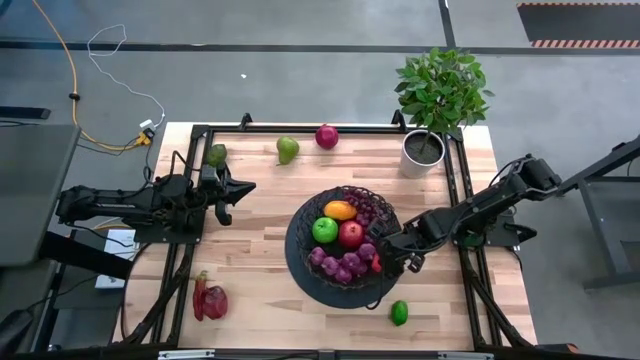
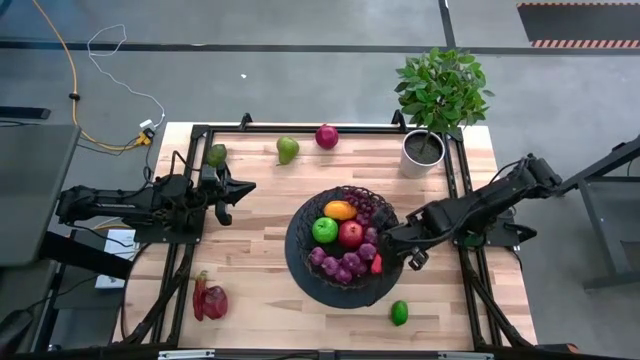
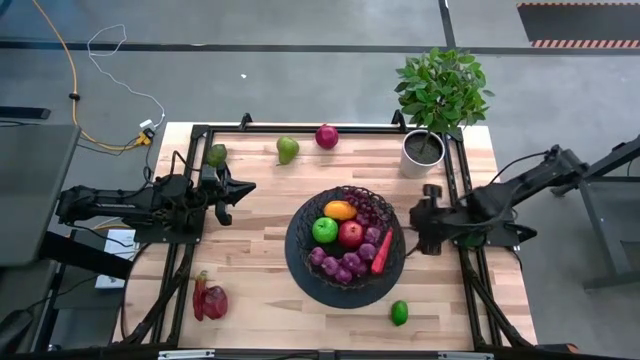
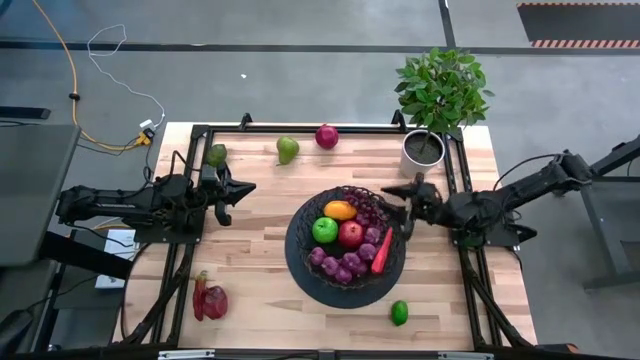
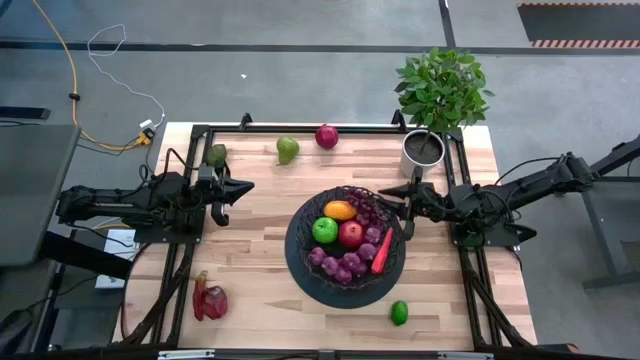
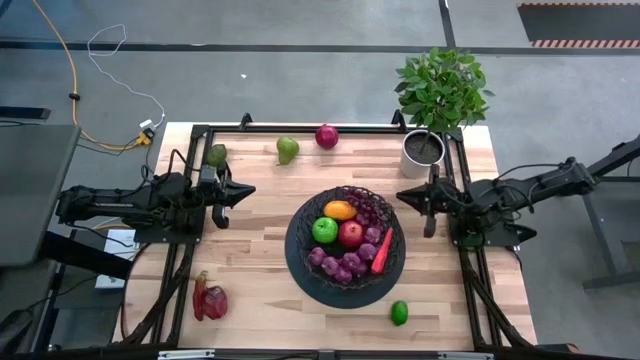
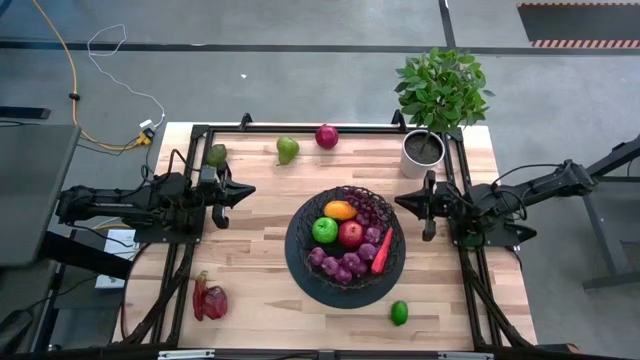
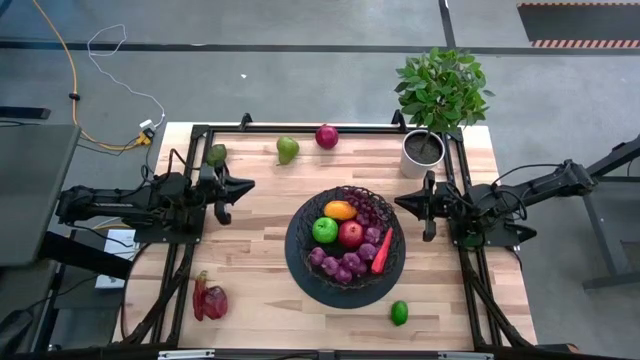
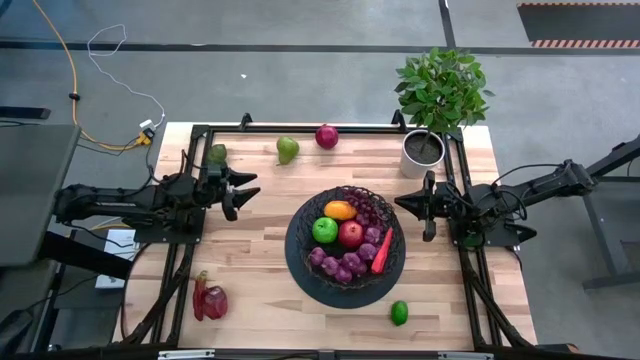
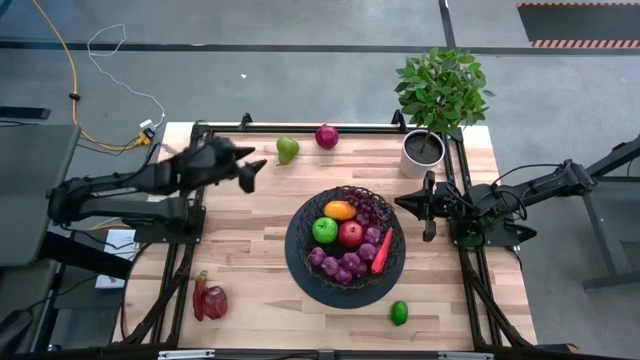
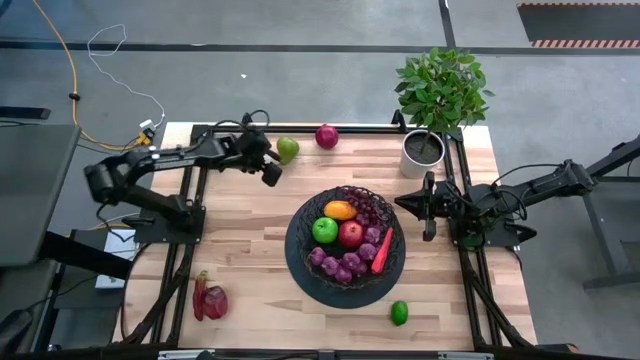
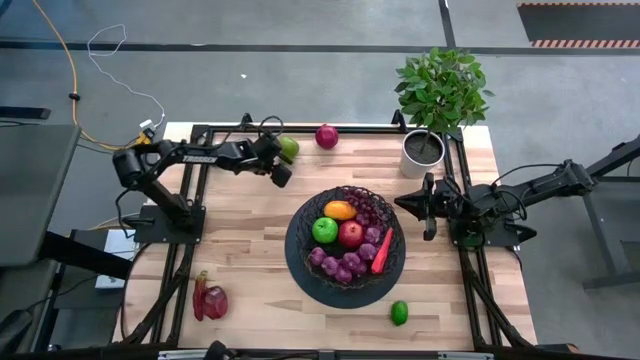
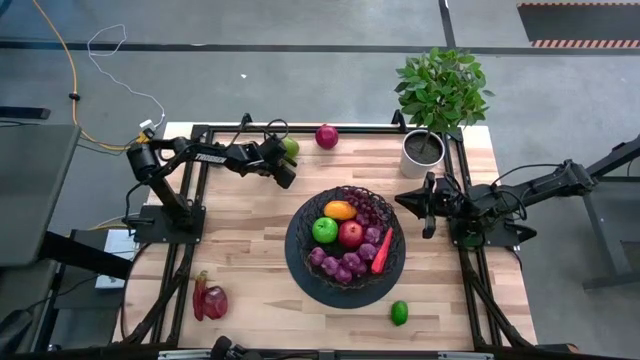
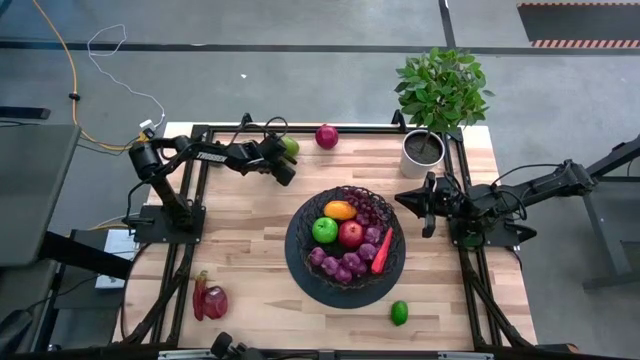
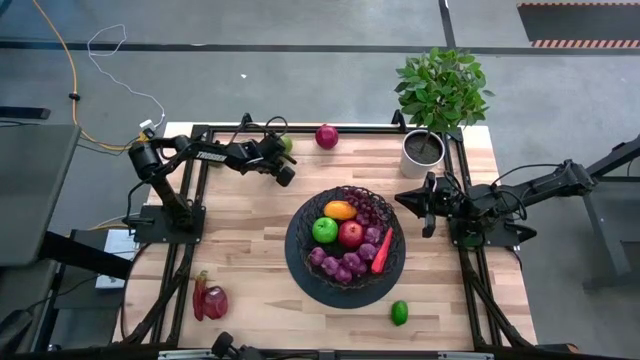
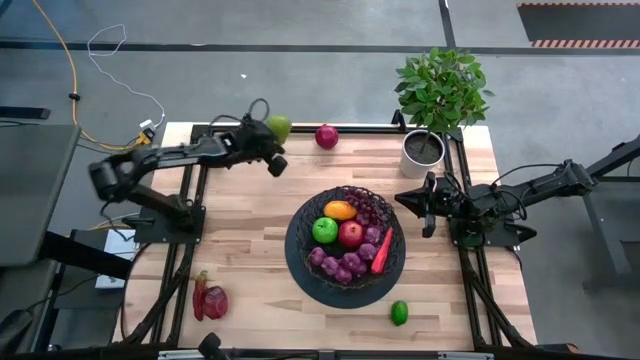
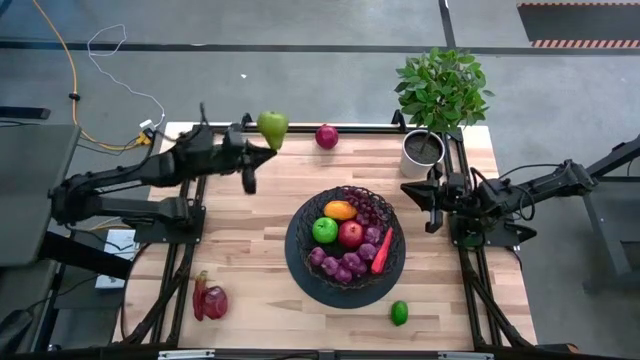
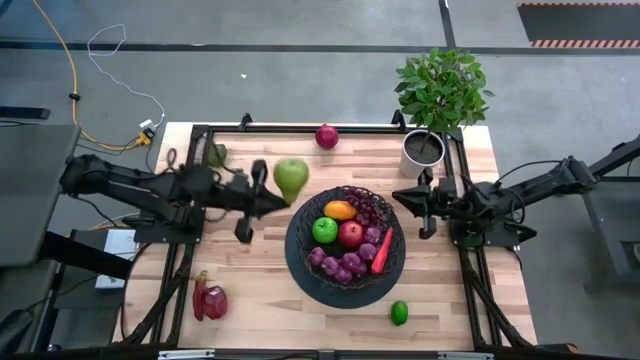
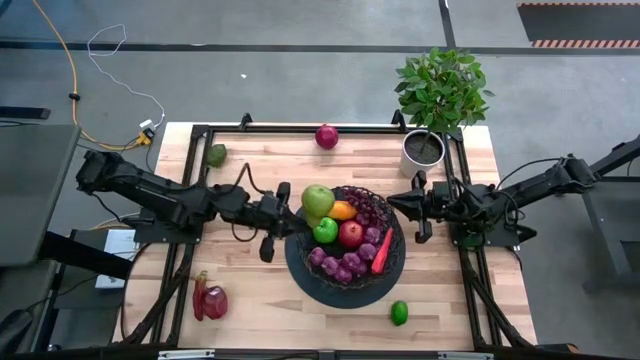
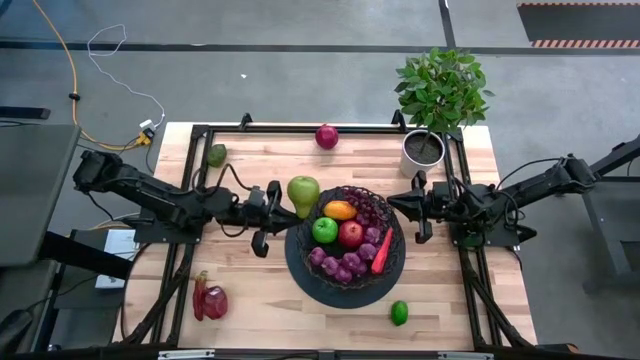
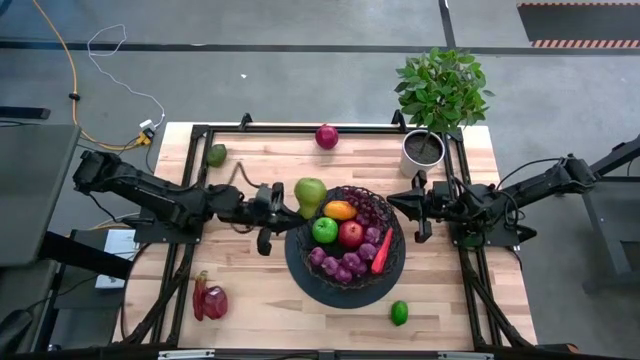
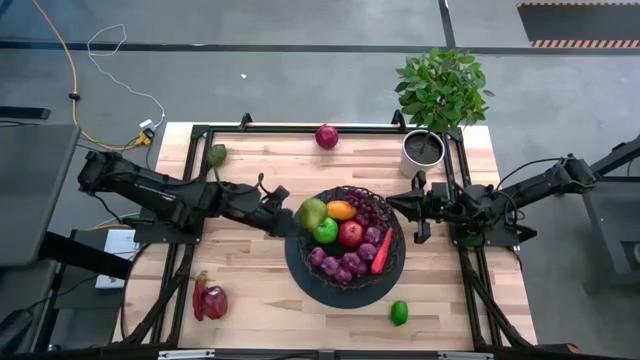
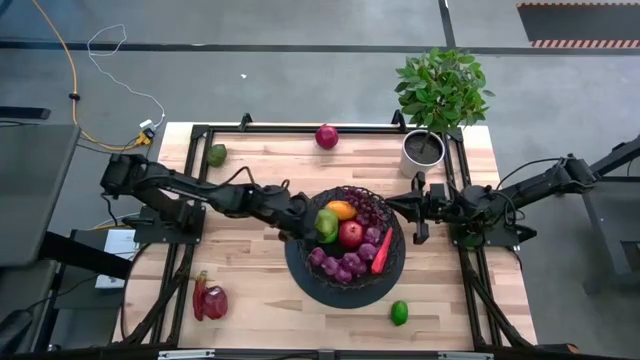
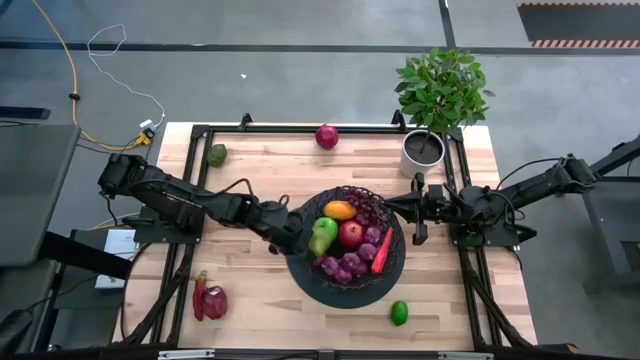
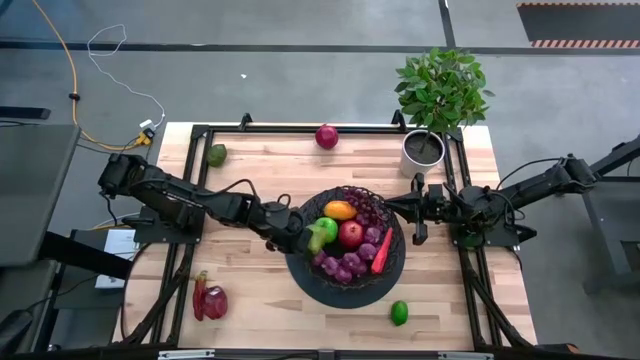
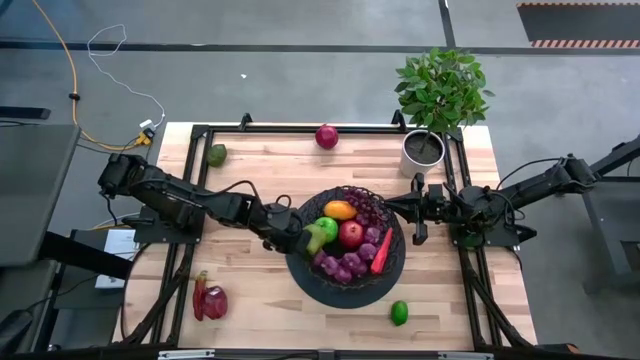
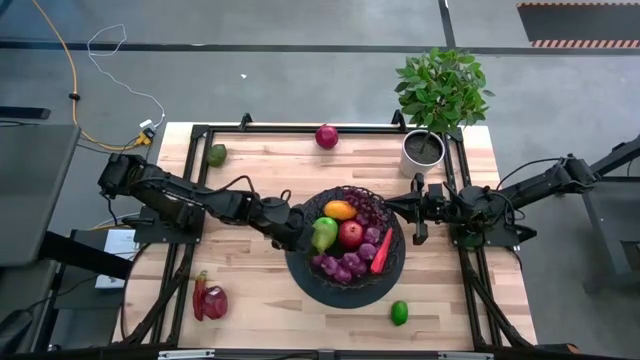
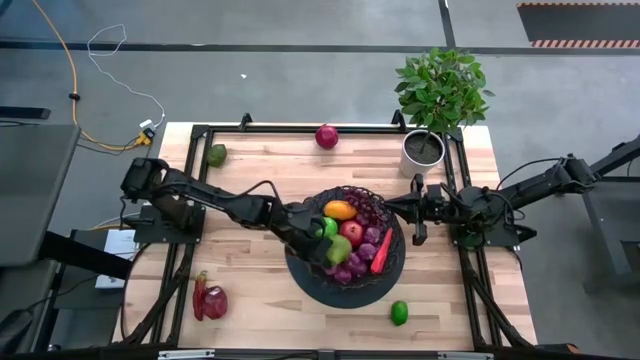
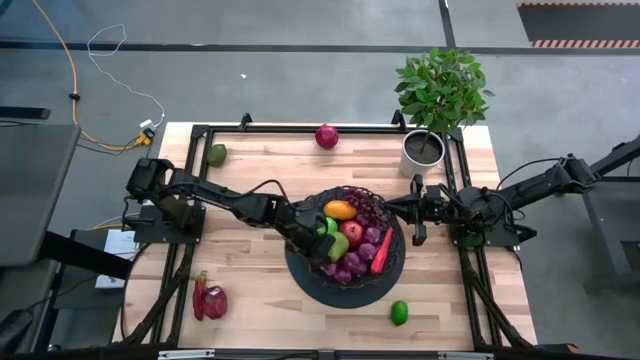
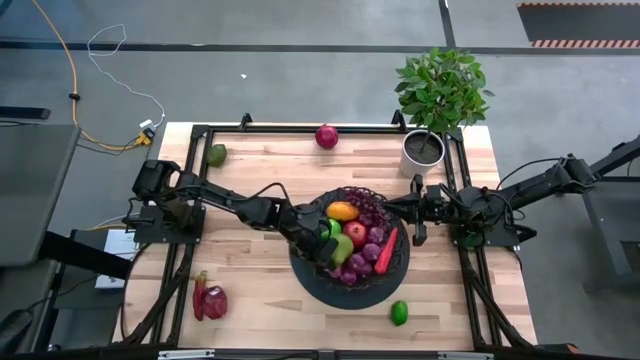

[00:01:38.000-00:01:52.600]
Task: Build produce basket
Put the green pear into the basket

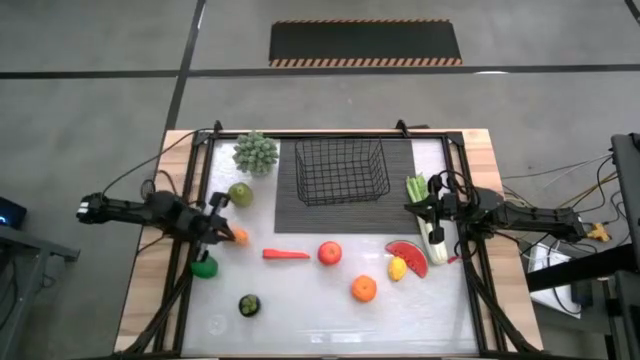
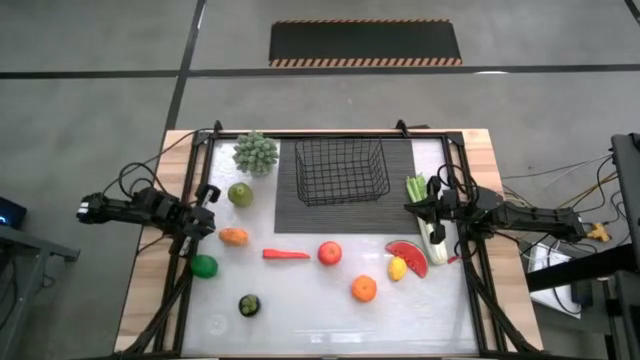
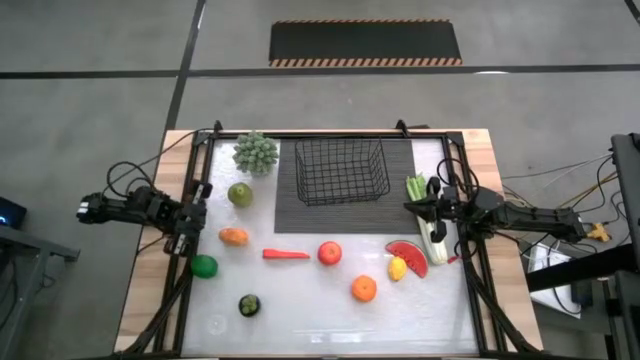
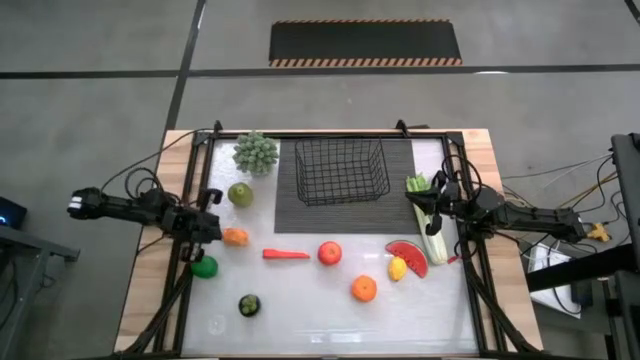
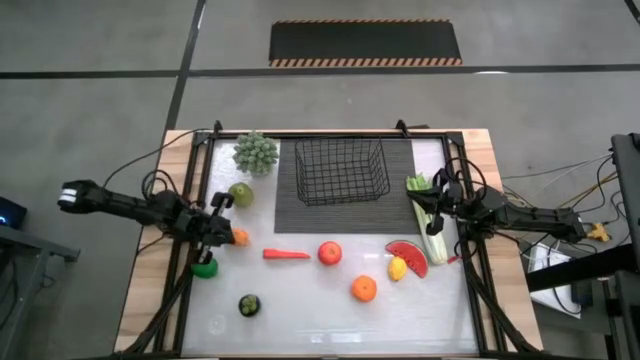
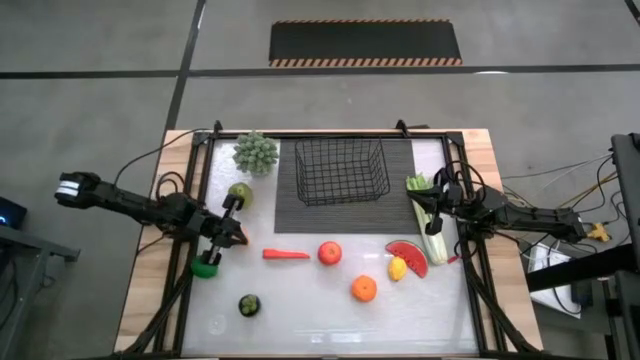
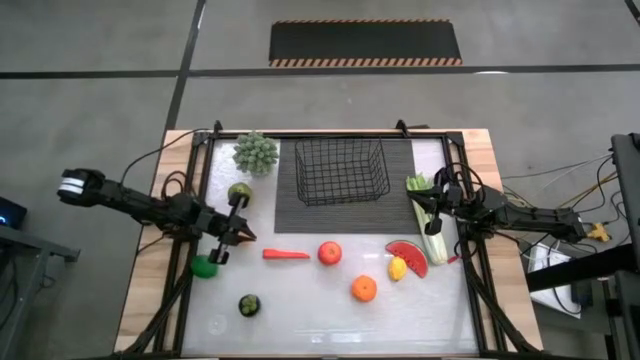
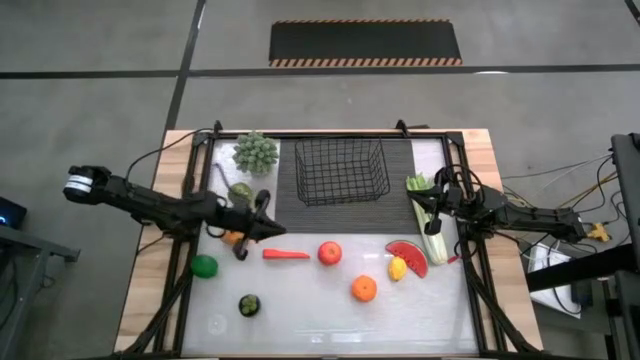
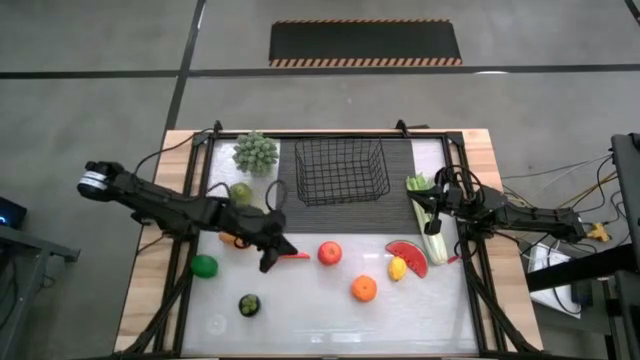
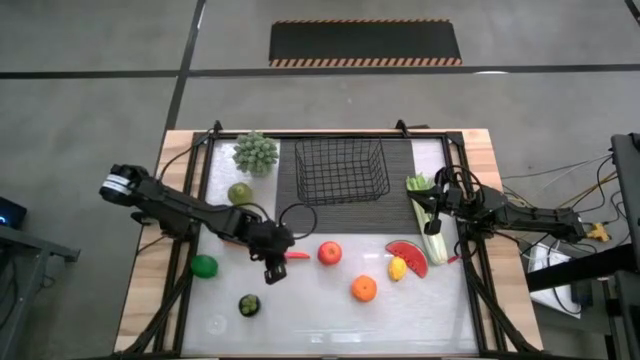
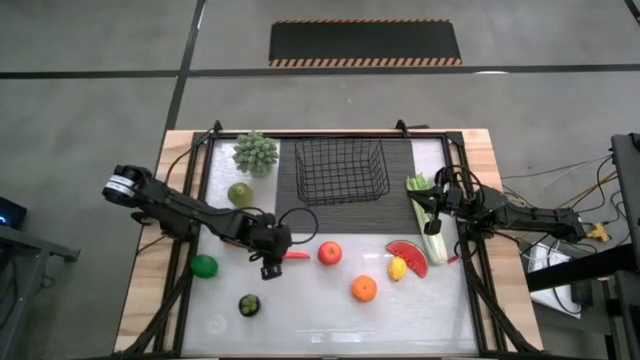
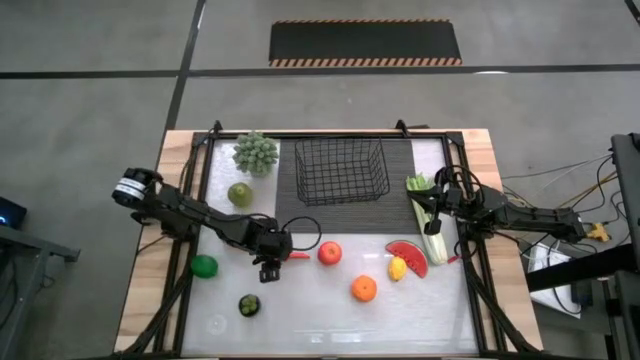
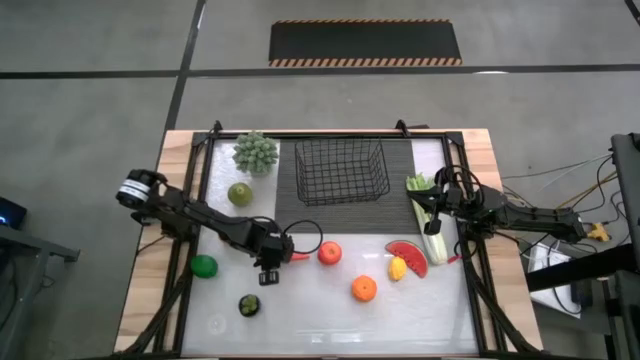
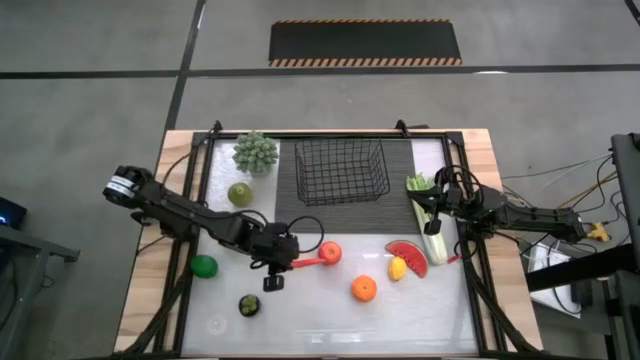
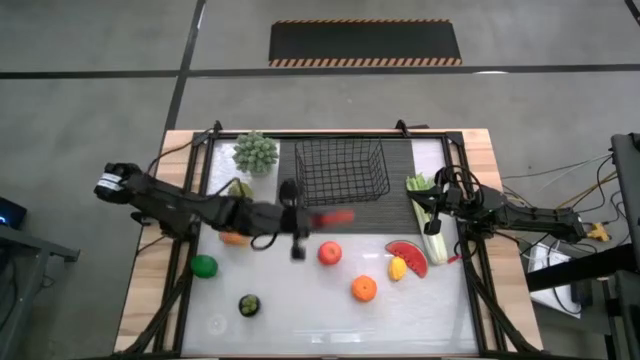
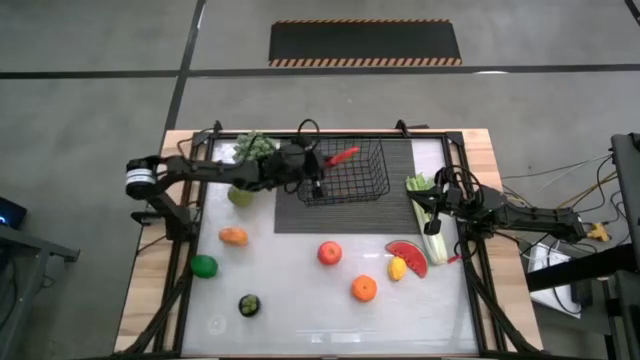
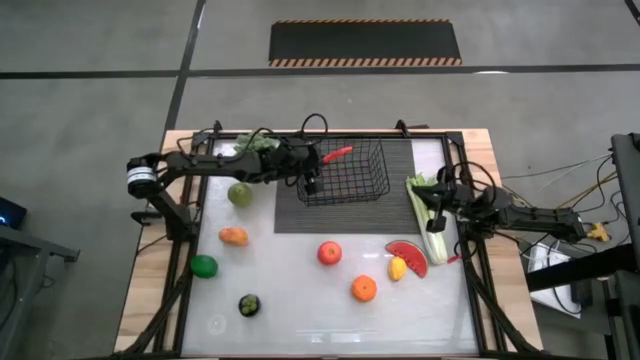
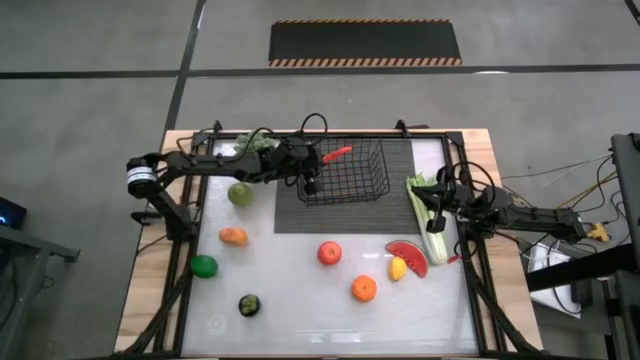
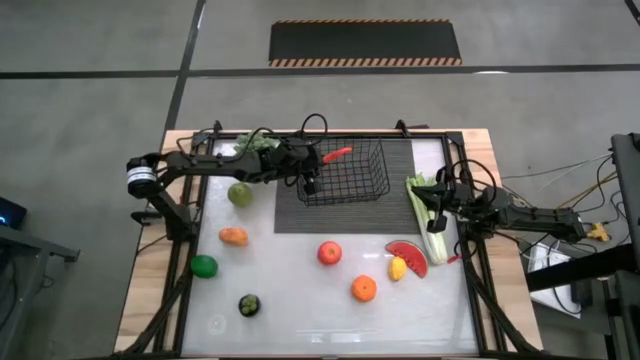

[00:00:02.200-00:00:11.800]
Task: Build produce basket
Put the orange carrot into the black wire basket
